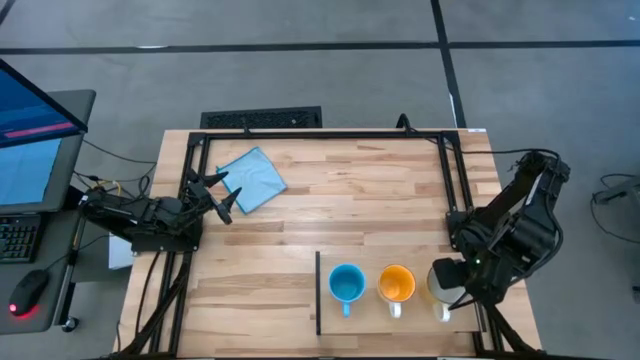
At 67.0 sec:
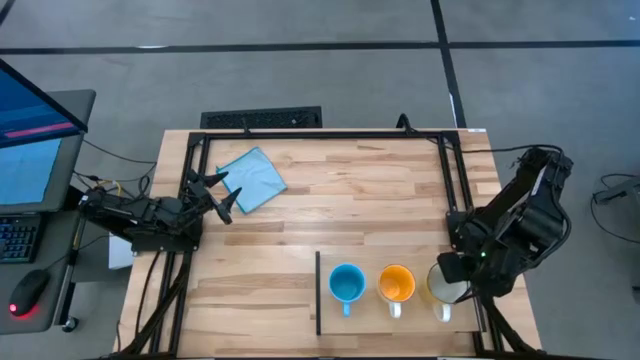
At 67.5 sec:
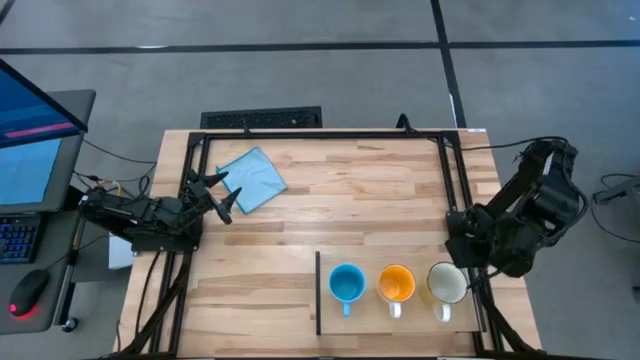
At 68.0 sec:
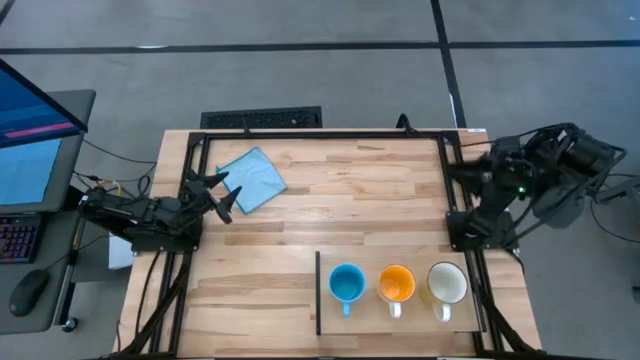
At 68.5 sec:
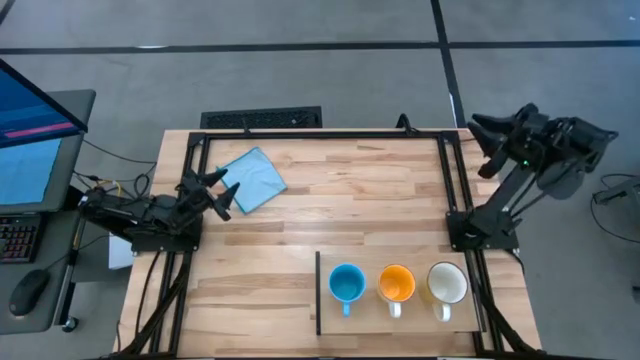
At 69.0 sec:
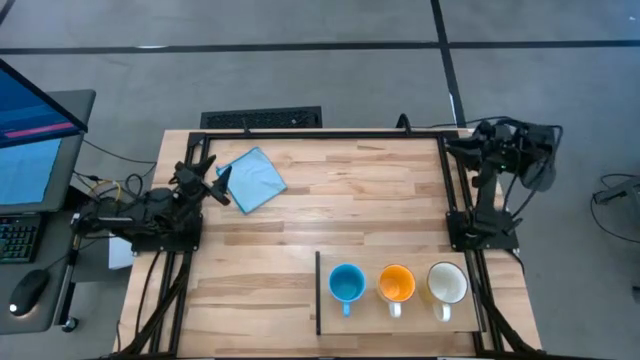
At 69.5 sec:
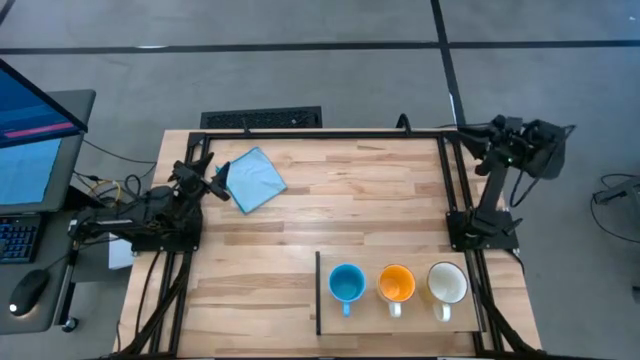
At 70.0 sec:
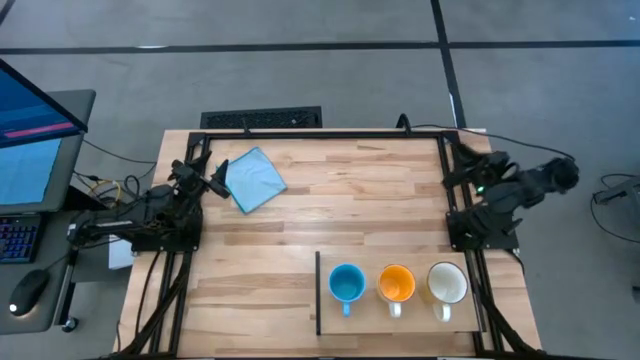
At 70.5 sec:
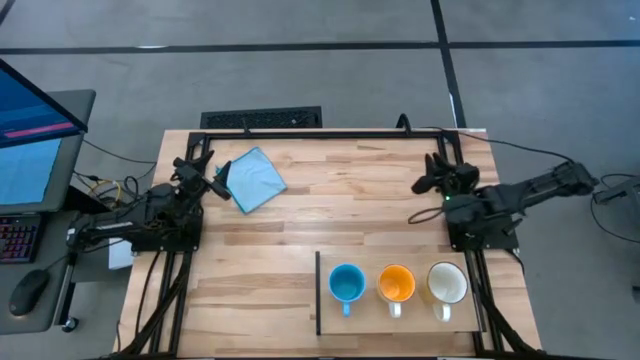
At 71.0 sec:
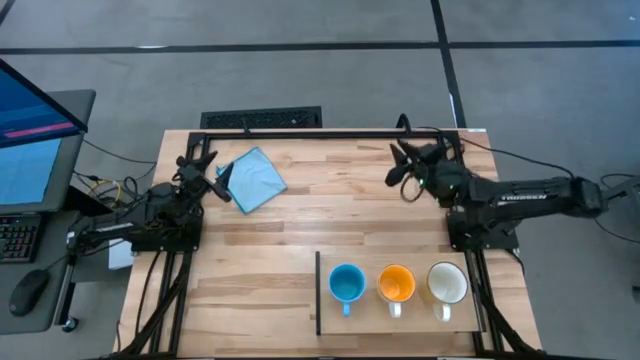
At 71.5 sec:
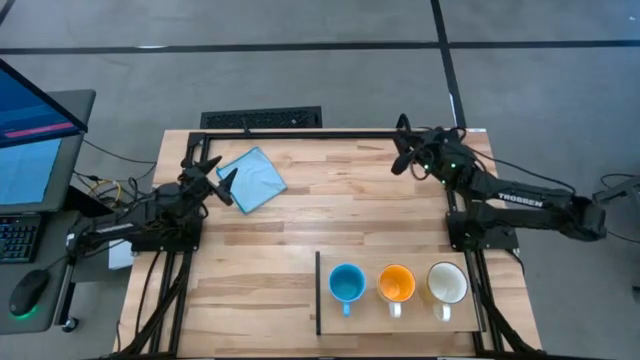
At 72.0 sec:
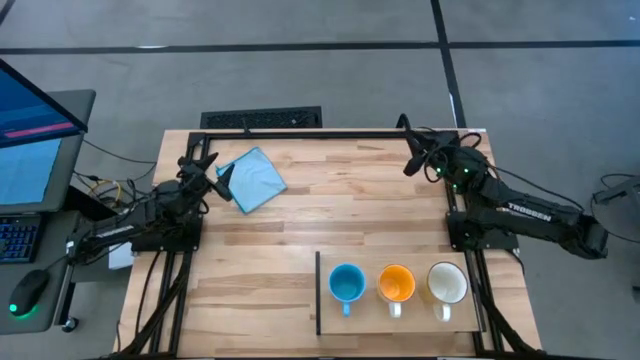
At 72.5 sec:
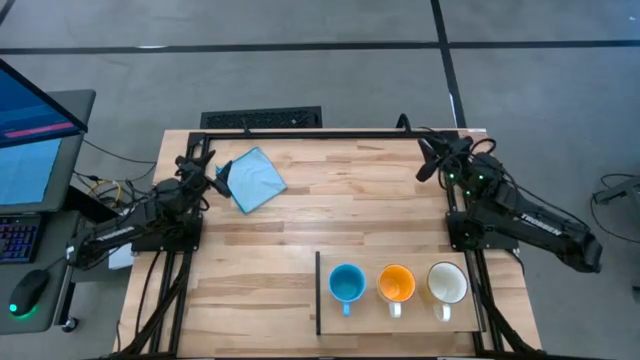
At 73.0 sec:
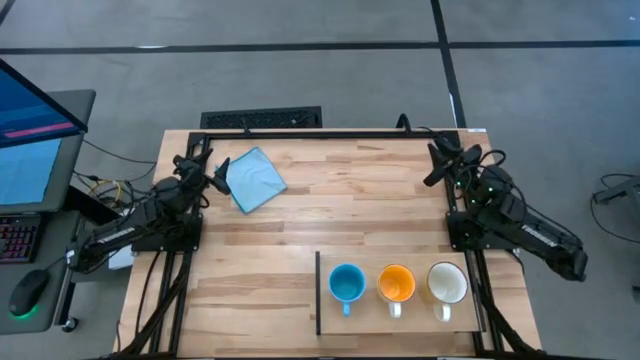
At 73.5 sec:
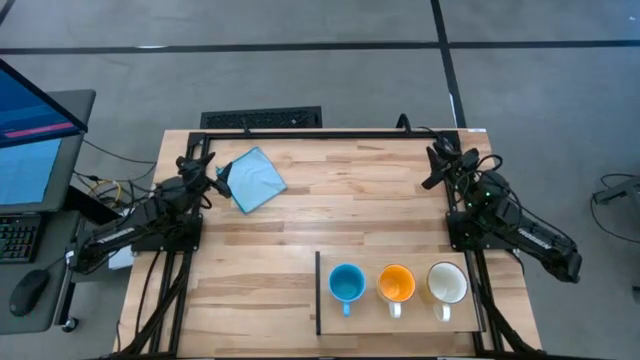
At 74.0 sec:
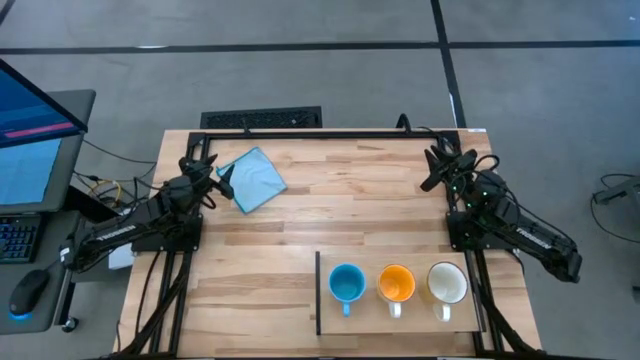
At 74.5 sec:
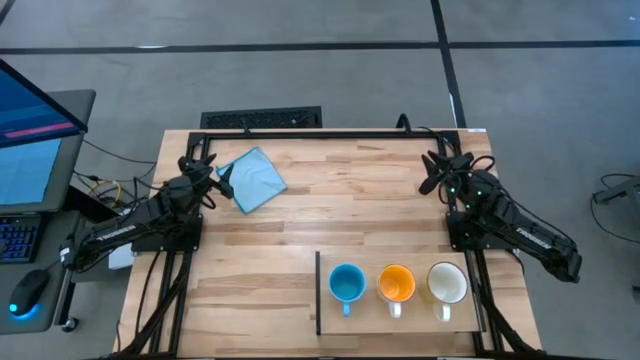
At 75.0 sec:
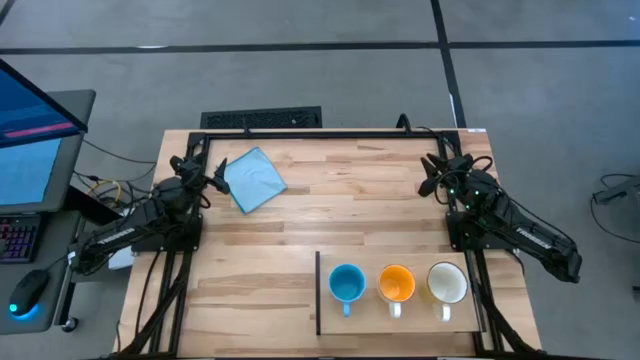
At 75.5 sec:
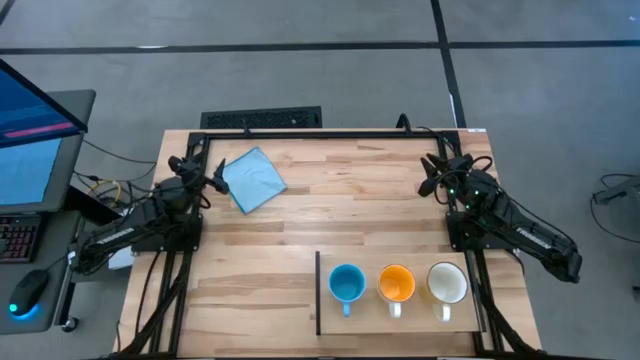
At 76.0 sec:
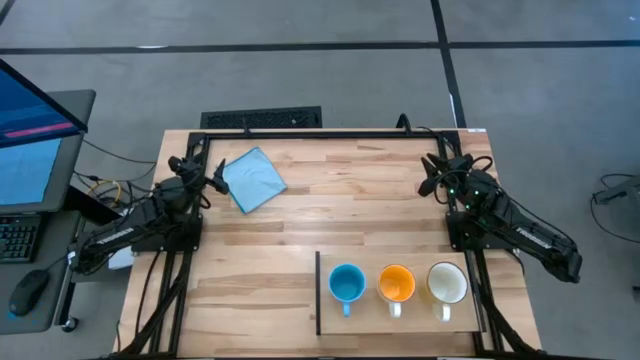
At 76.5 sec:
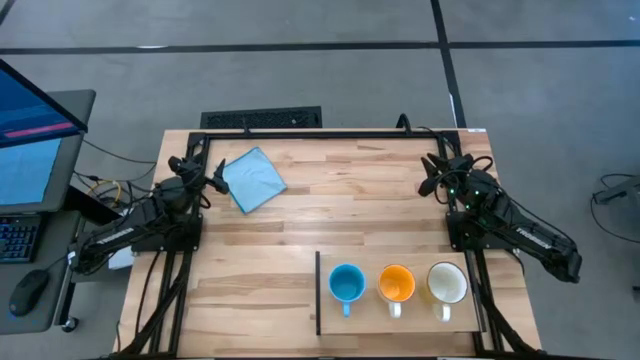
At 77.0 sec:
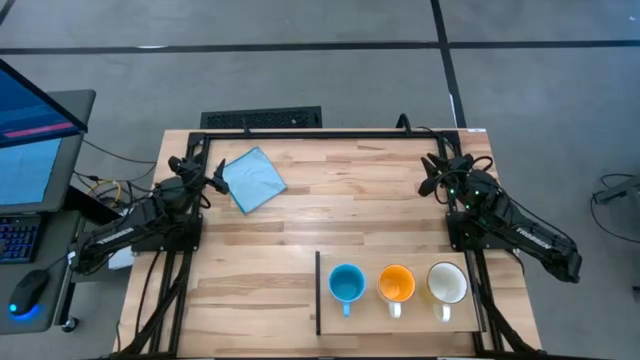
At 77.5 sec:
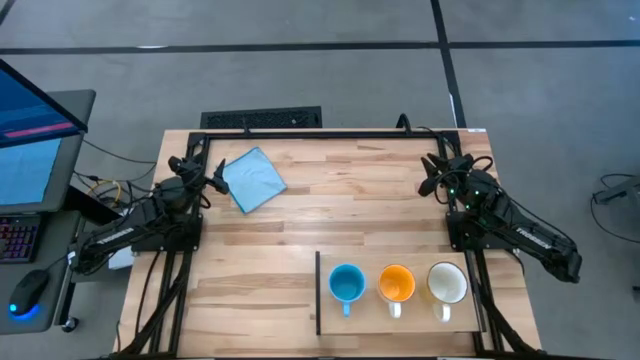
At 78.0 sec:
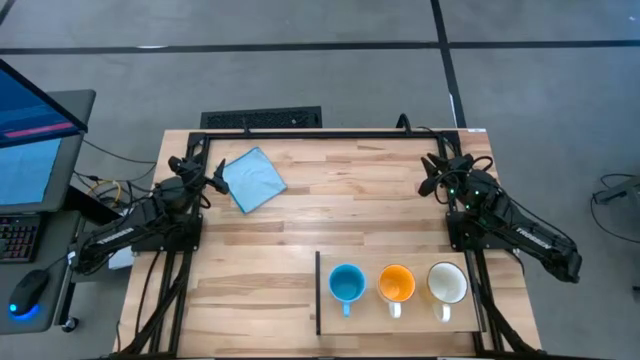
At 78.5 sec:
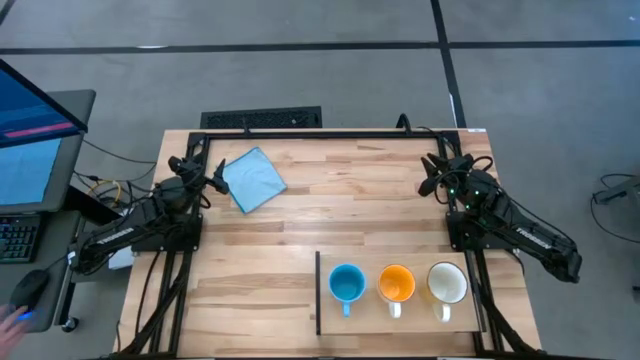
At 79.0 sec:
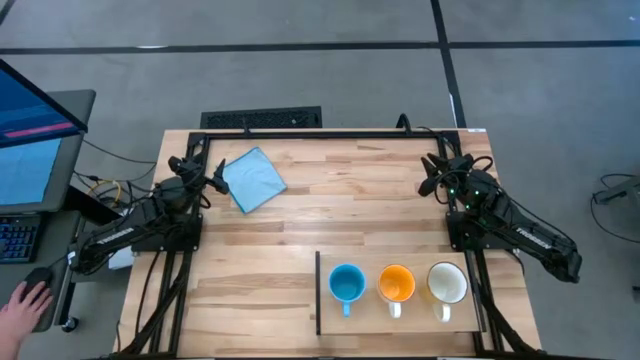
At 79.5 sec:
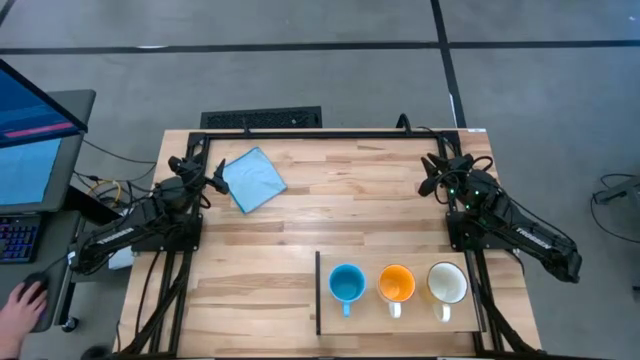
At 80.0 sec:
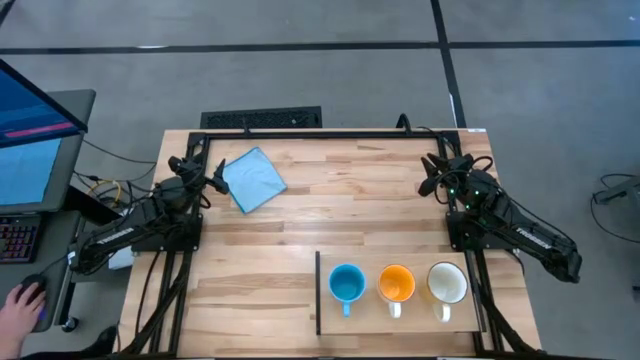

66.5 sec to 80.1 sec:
Task: Stack small to large cups/mugs on shelf
Return to Home Position
